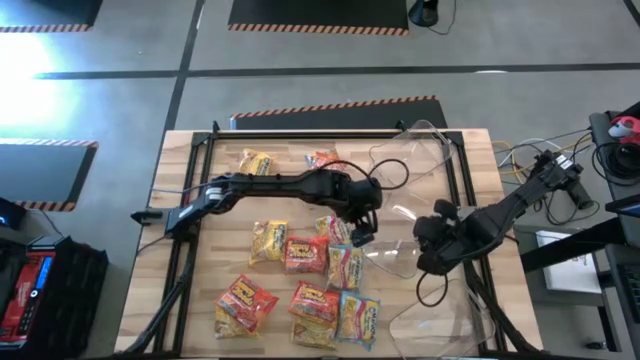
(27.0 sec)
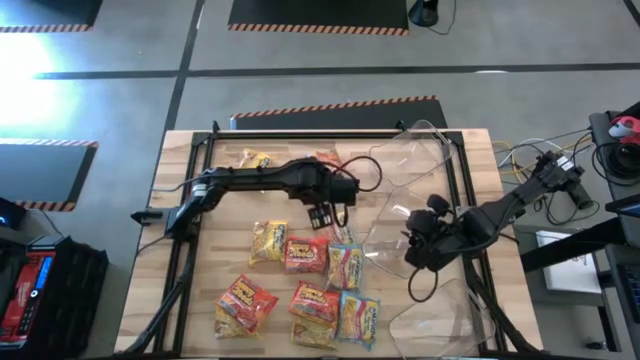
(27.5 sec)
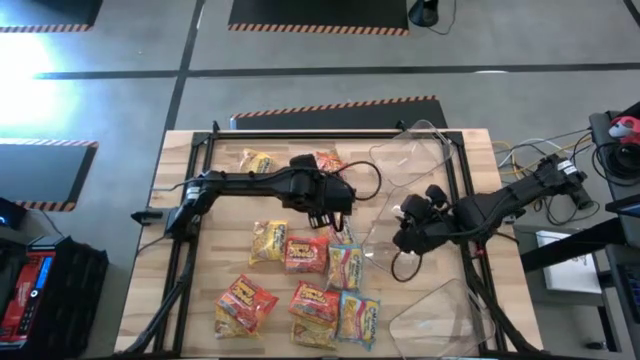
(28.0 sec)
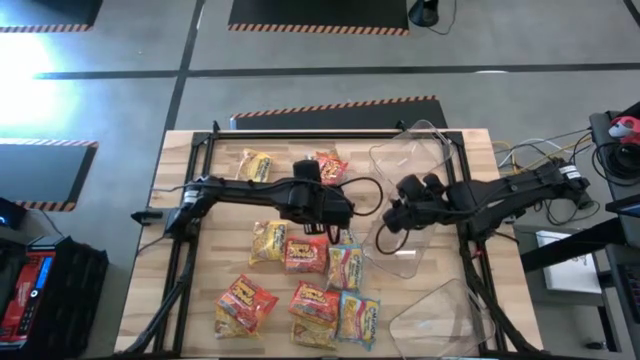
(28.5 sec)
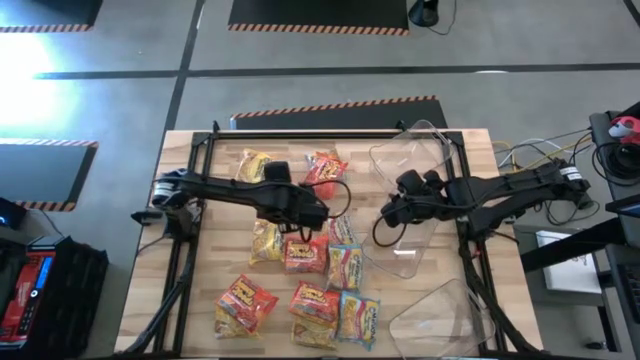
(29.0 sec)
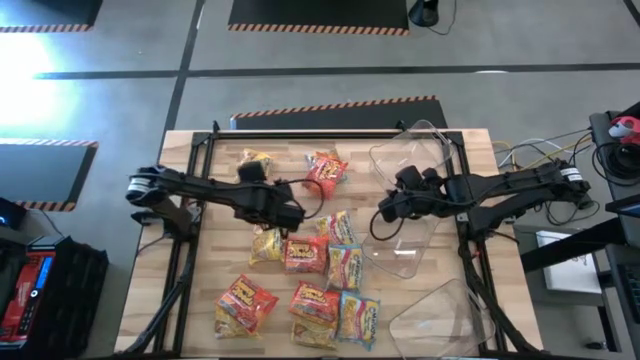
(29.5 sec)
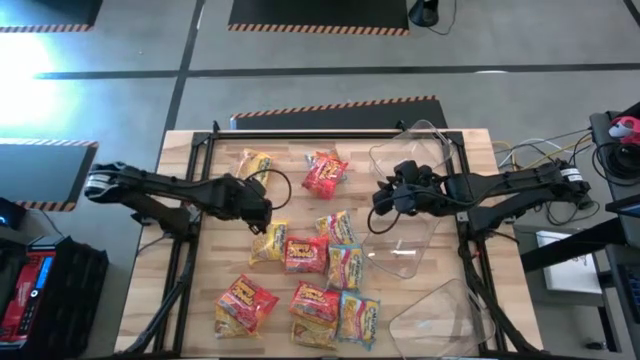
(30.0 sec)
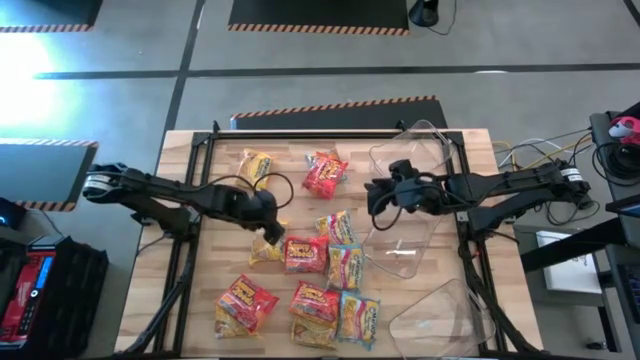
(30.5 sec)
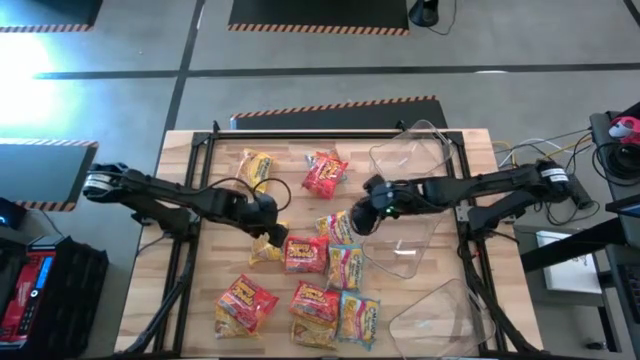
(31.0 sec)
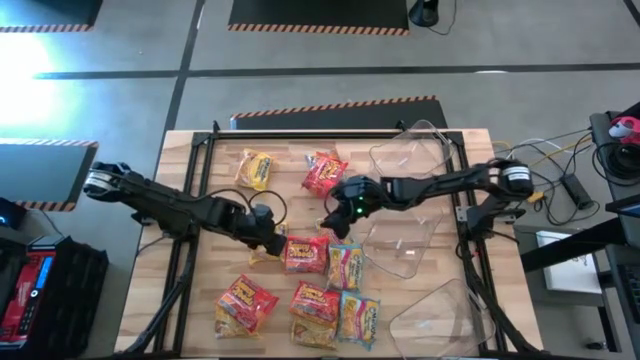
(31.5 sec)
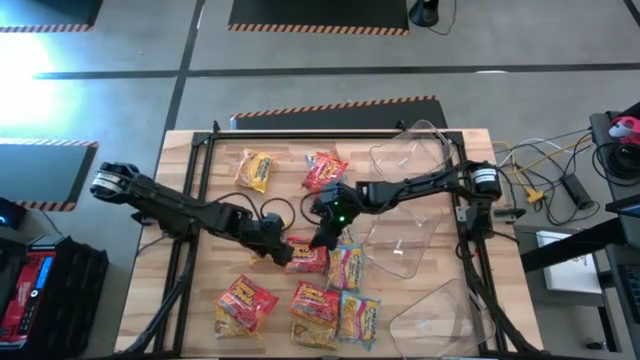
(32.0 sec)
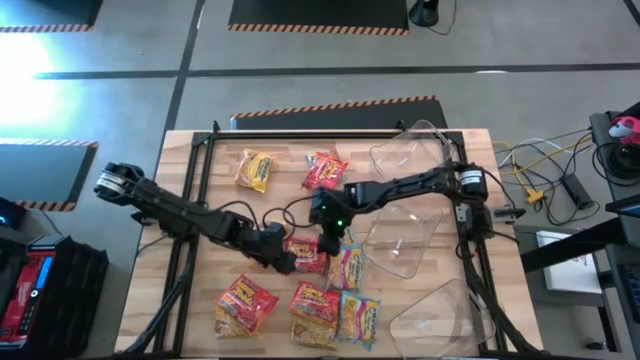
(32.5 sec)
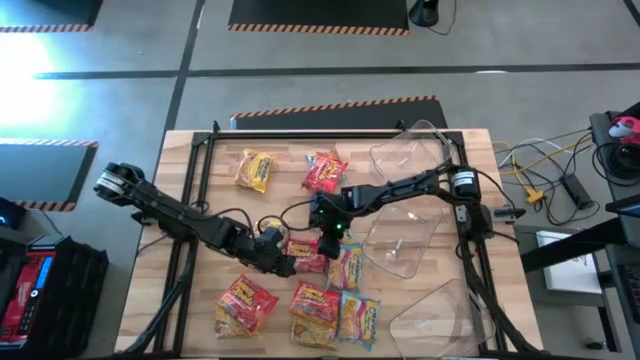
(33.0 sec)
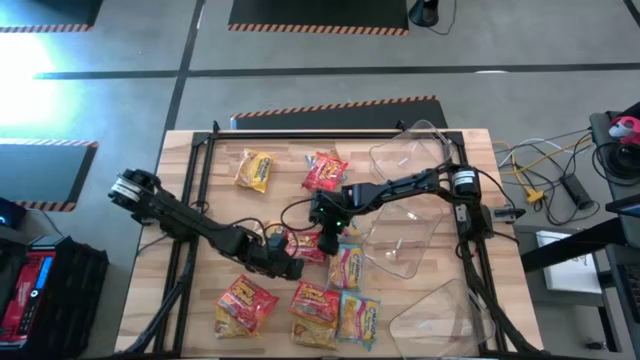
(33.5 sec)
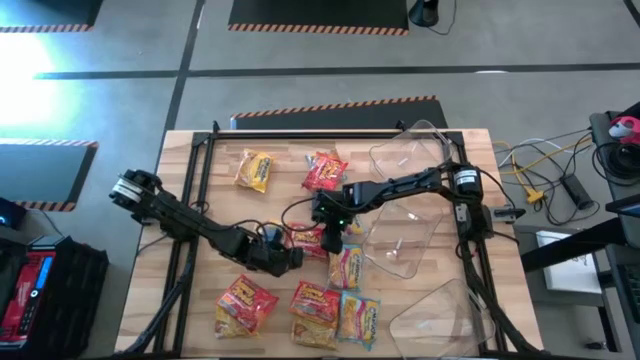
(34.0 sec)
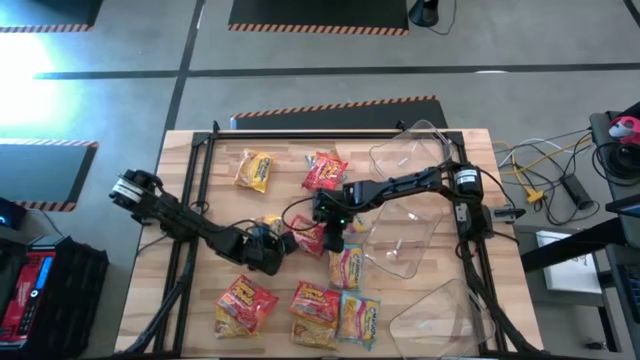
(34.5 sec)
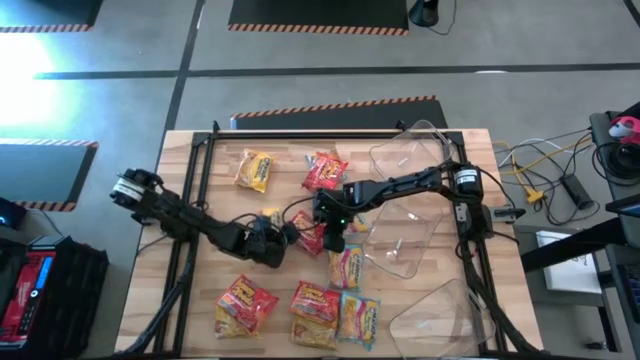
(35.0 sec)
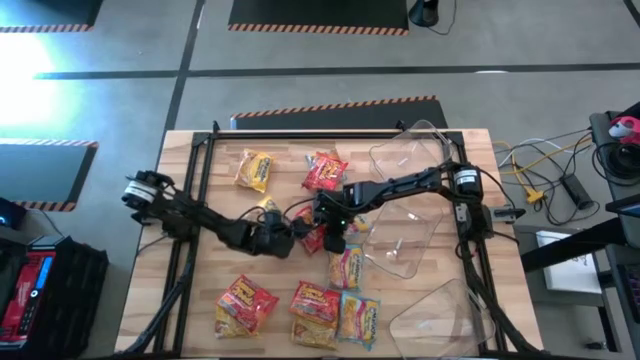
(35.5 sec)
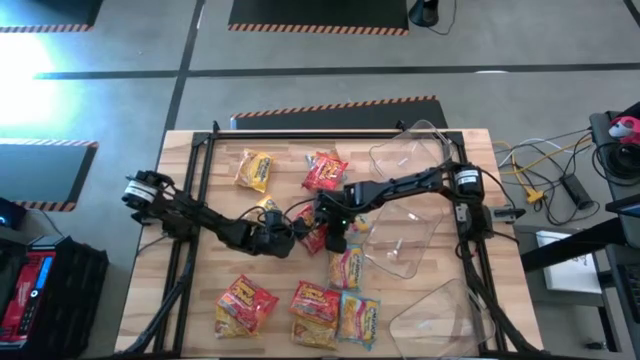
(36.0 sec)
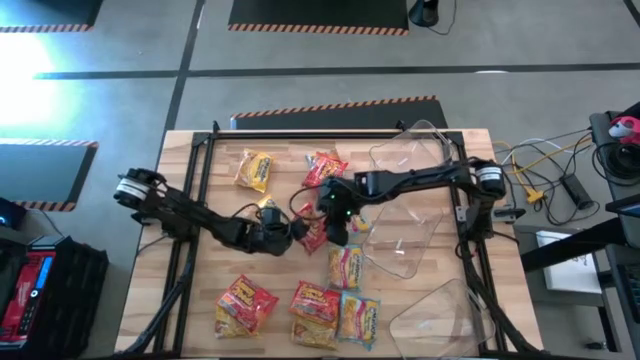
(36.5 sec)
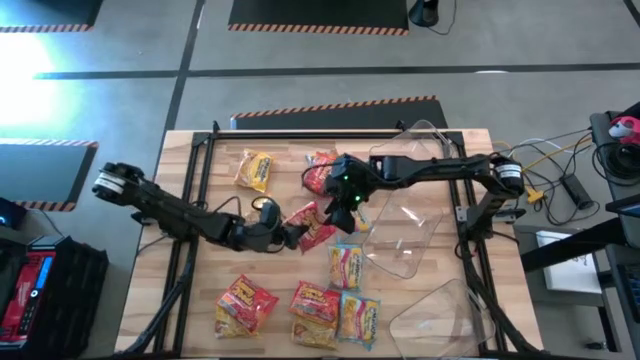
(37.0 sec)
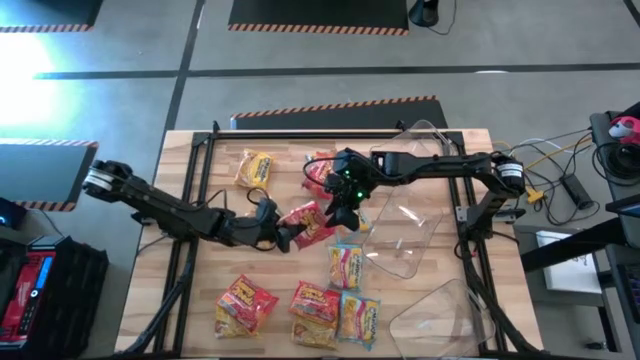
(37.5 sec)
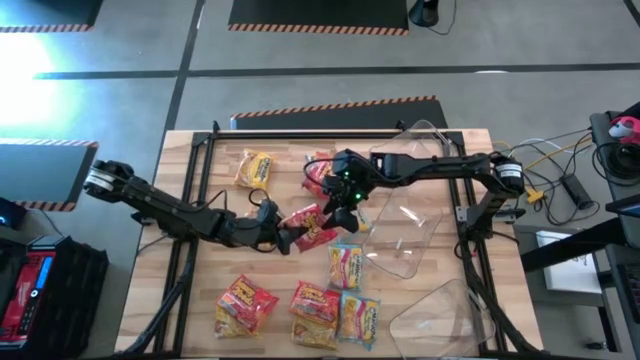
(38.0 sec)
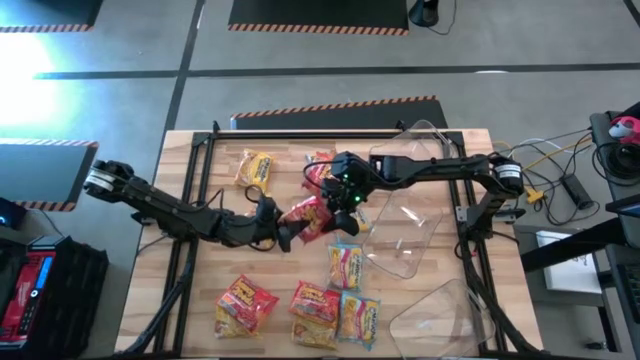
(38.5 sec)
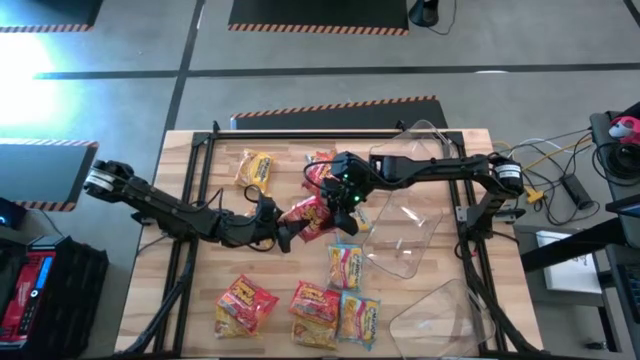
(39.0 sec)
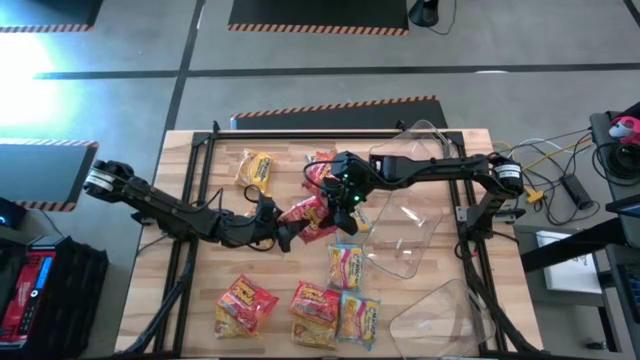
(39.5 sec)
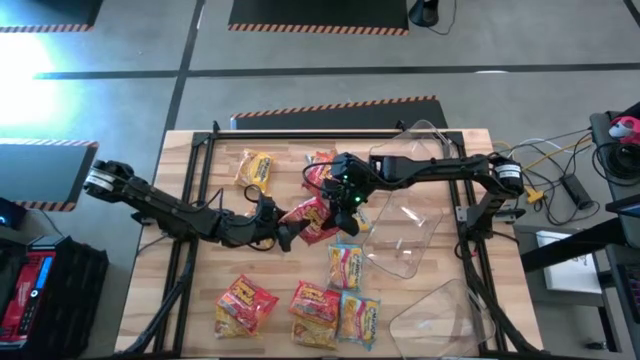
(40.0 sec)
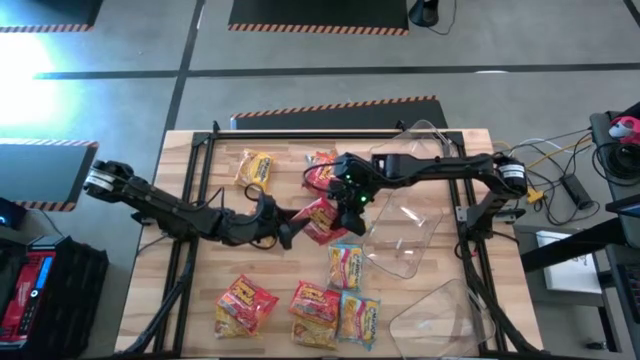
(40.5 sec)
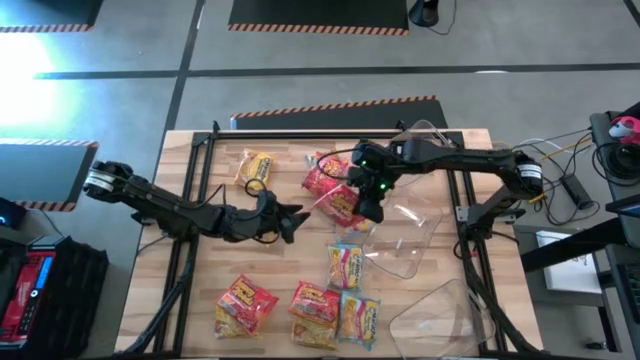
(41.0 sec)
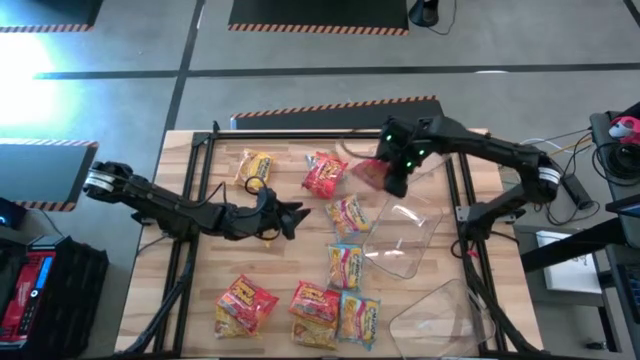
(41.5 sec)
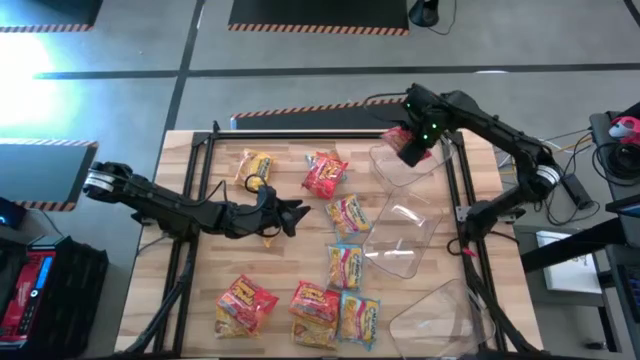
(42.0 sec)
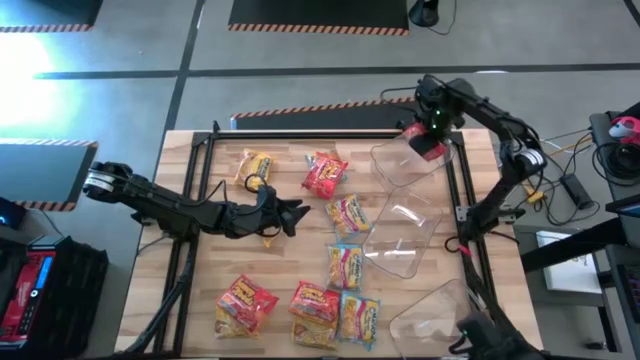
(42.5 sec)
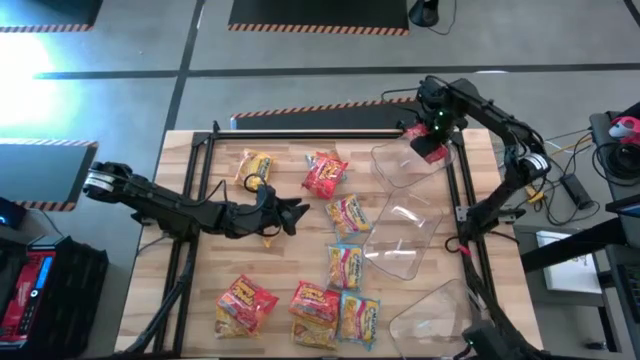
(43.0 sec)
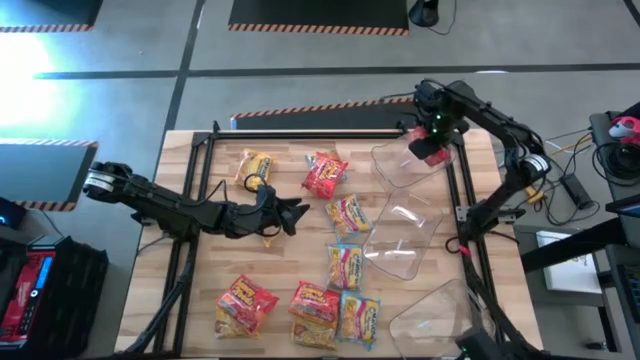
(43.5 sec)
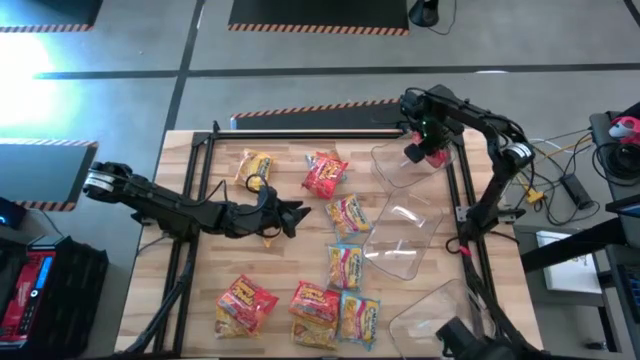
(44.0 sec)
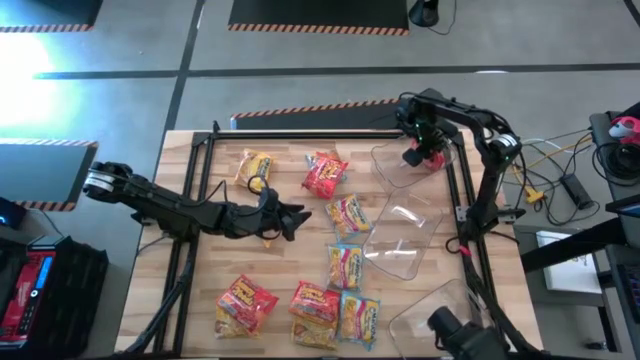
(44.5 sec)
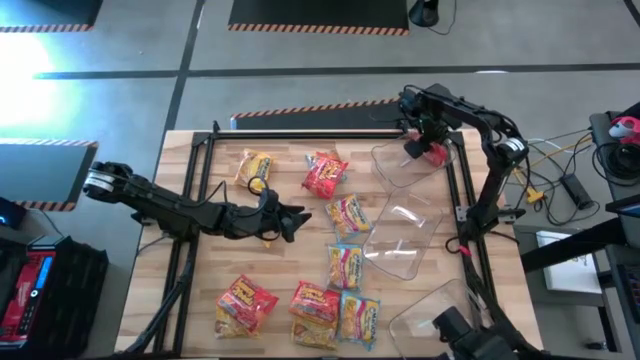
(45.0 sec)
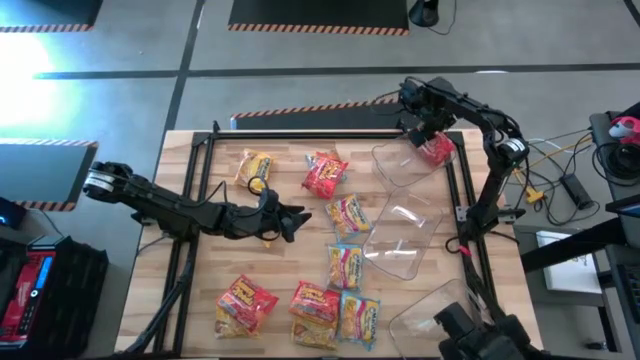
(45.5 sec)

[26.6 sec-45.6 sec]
Task: Sort Maruchan noodles
Put the orange noodle pack into the top transparent bin

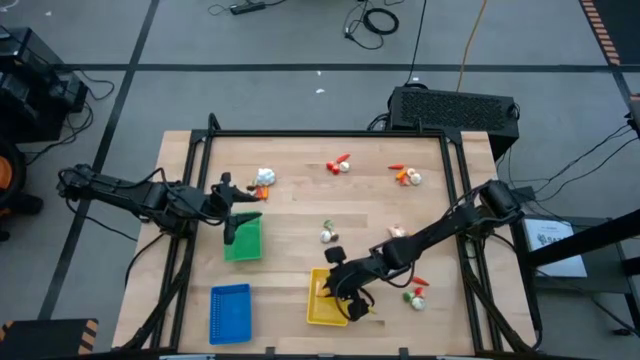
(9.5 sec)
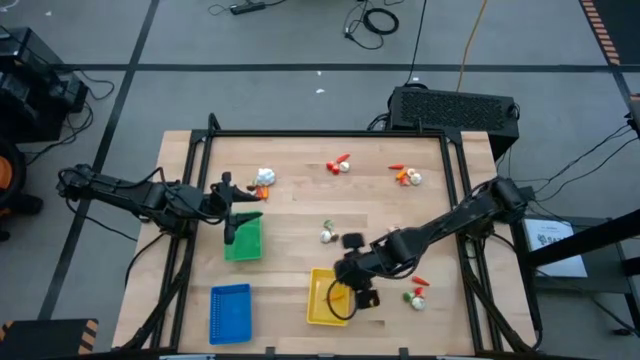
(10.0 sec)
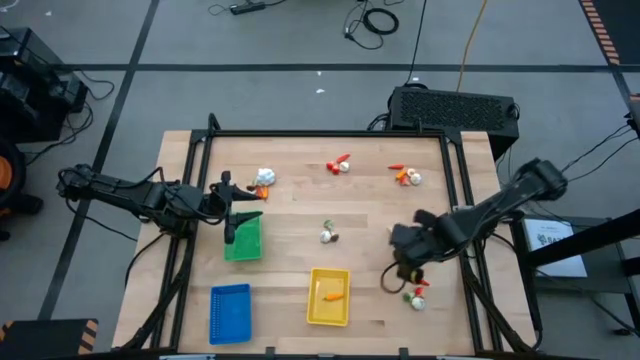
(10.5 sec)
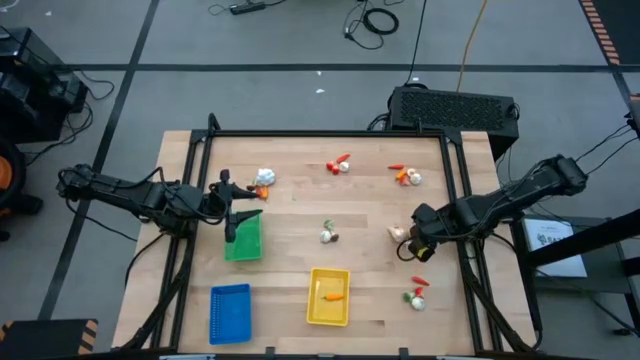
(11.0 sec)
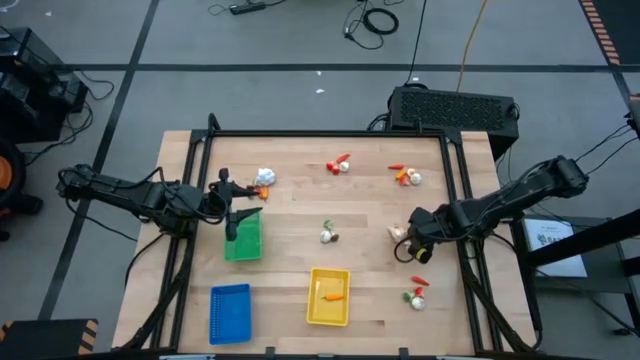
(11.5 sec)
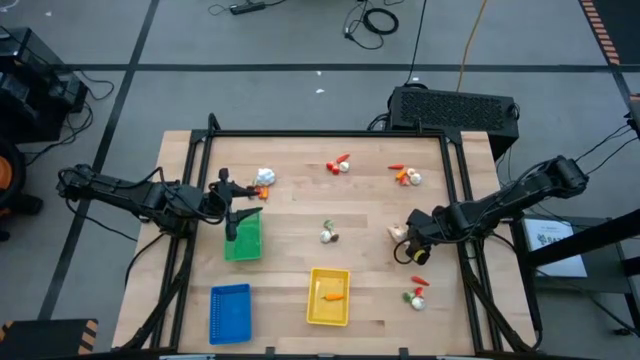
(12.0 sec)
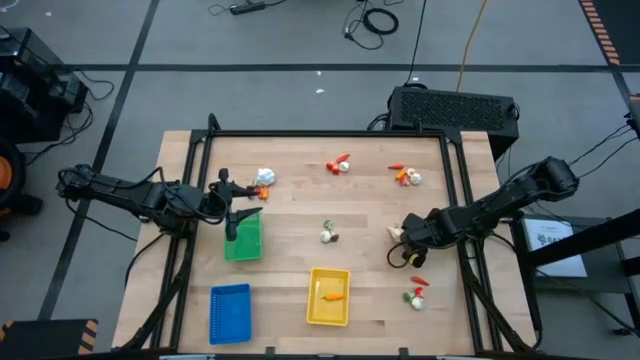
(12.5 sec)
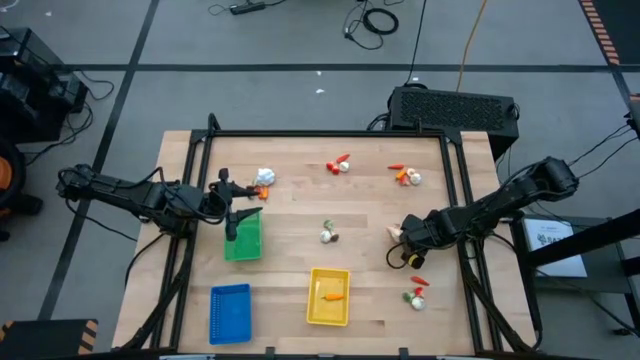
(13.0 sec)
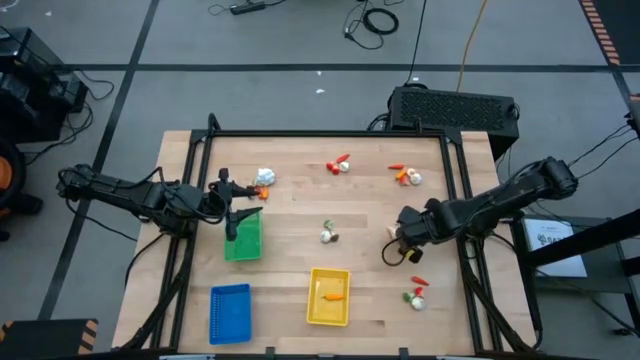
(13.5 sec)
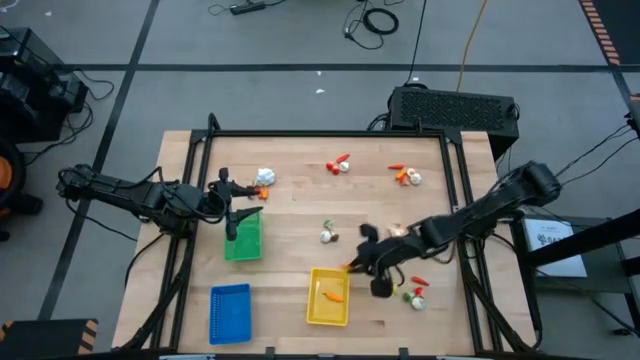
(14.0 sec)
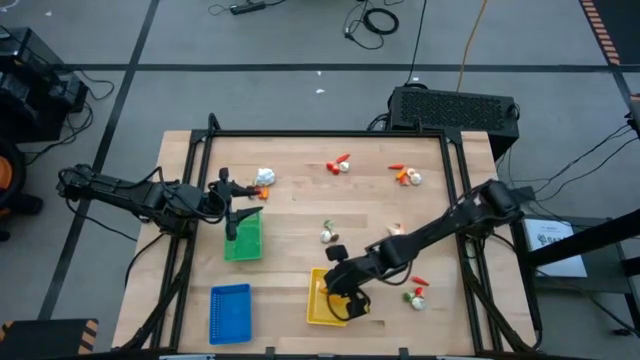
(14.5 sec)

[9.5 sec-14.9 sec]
Task: Sort produce into baskets
Put the yellow chili pepper into the yellow basket
